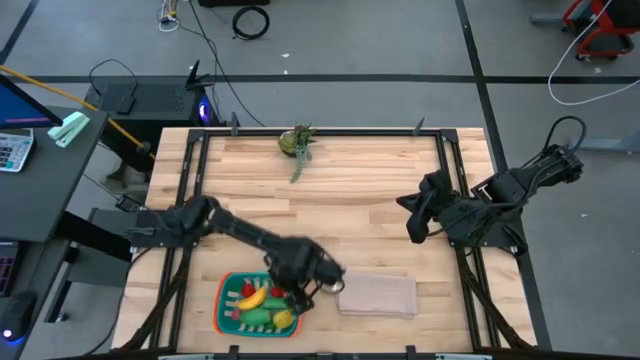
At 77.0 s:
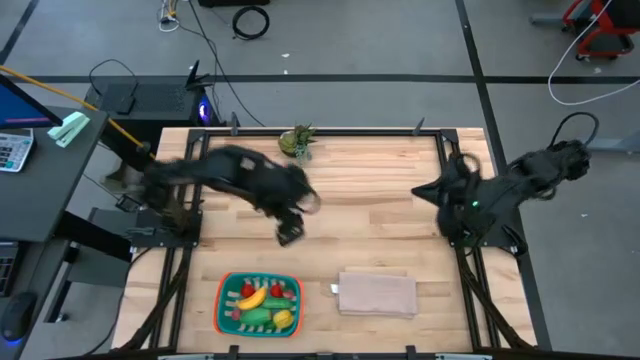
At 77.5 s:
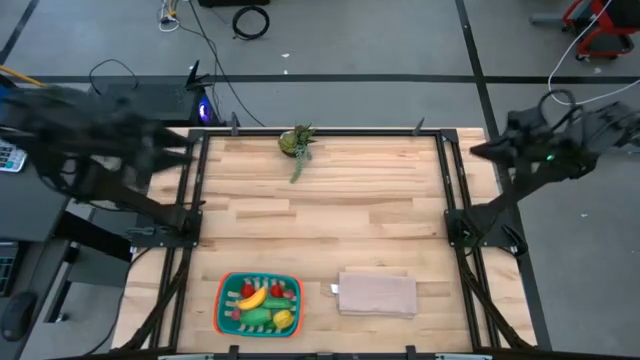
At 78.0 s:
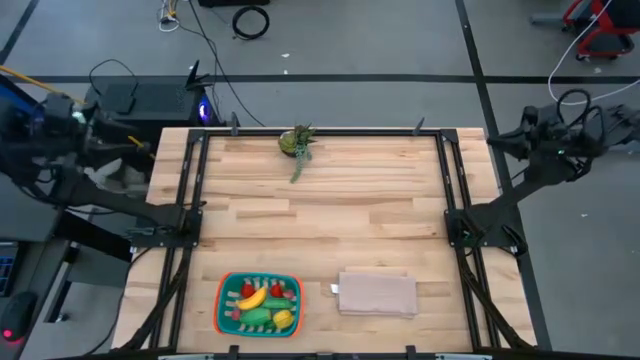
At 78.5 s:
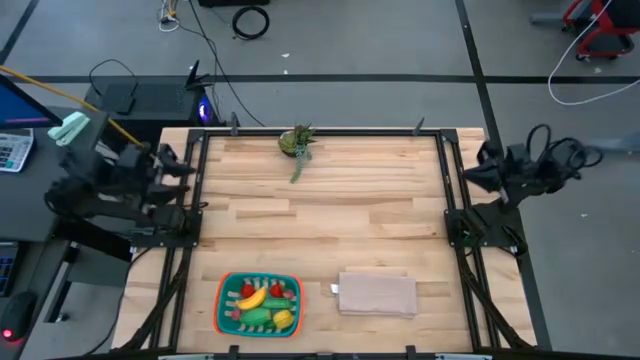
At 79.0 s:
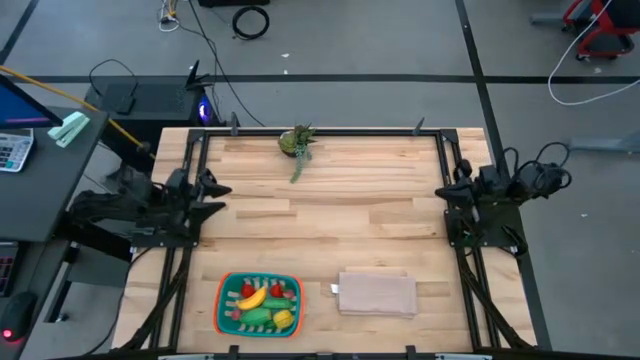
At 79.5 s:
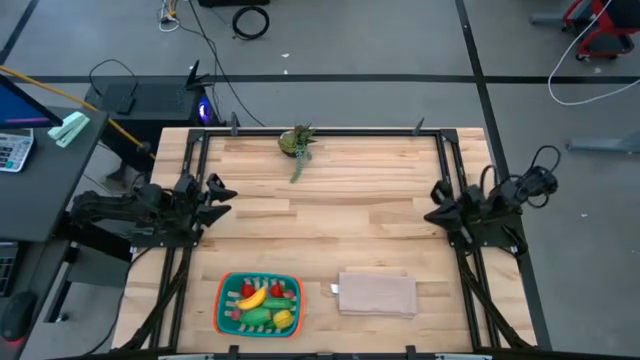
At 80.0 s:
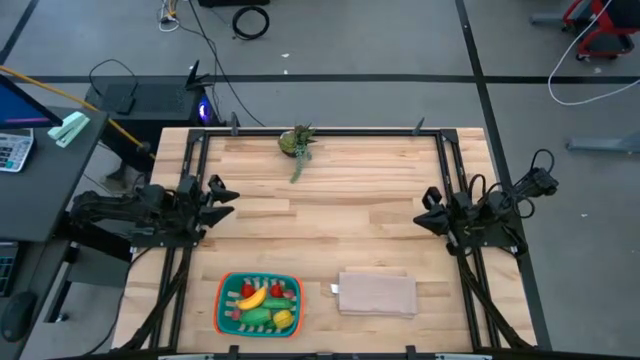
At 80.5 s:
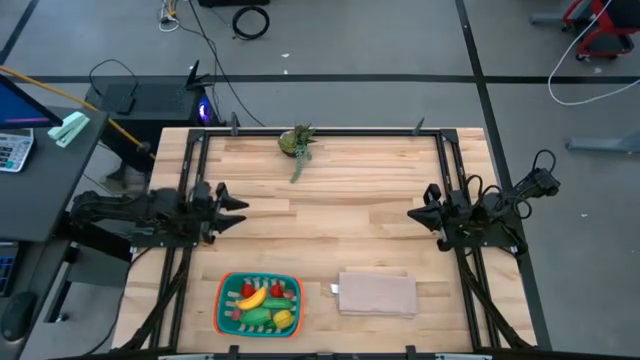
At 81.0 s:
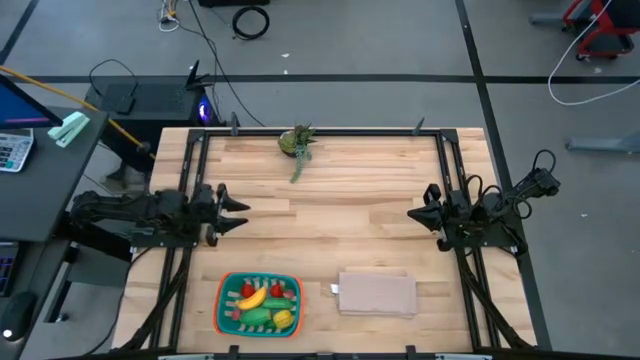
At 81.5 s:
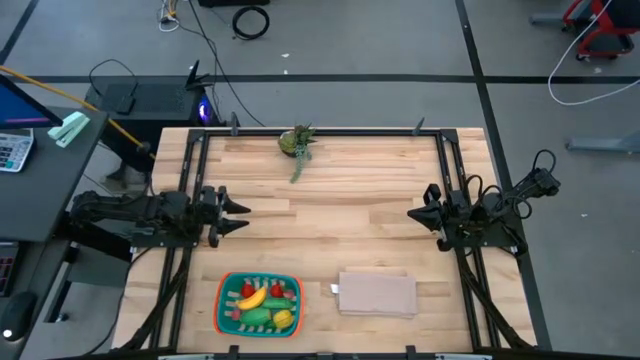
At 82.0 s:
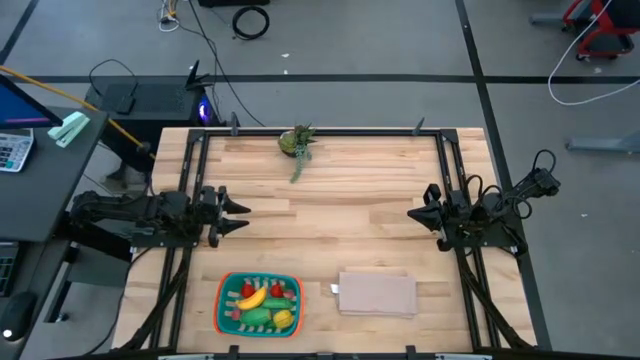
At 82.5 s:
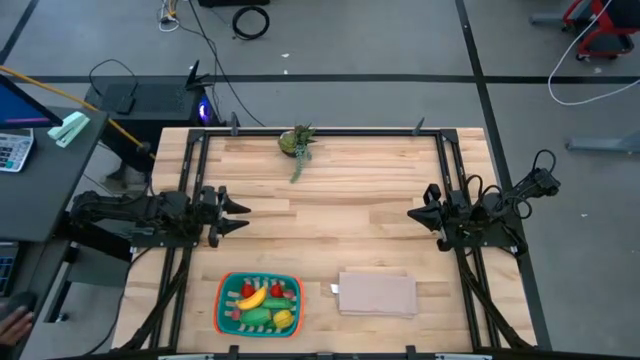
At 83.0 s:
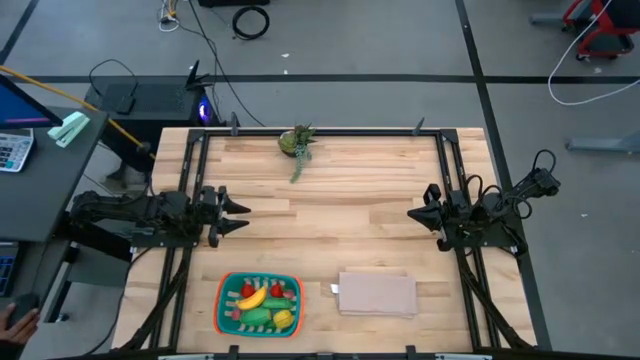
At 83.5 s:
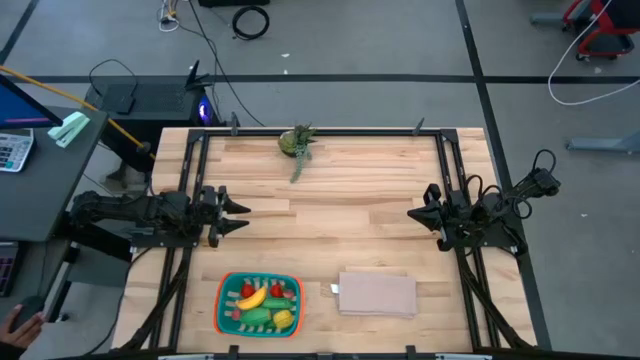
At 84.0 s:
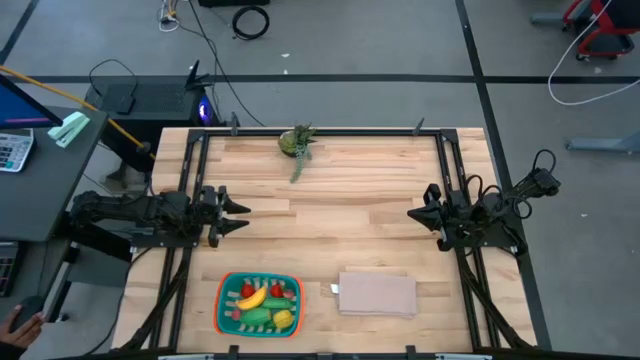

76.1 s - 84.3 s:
Task: Pick and placing Produce into tupperware
Return to Home Position

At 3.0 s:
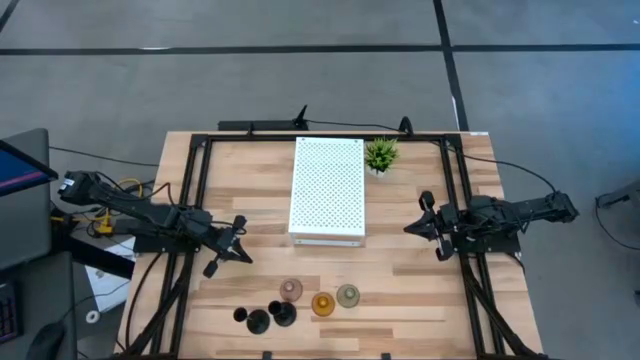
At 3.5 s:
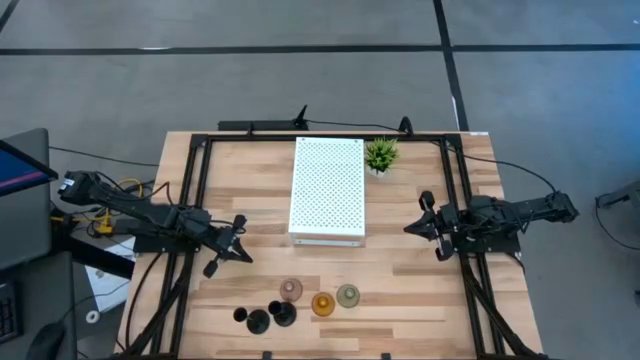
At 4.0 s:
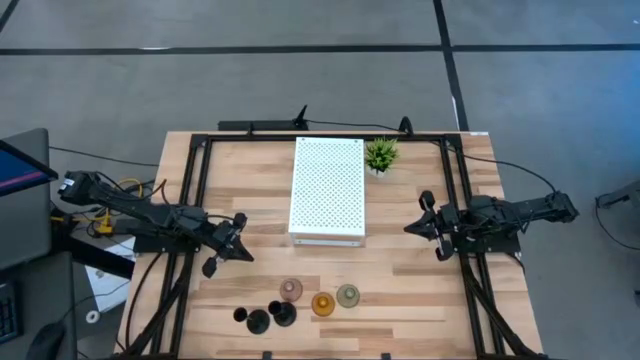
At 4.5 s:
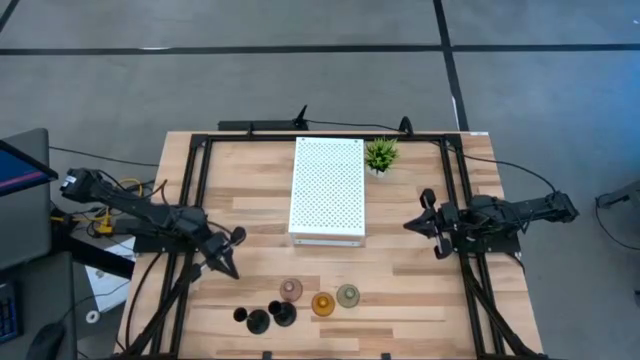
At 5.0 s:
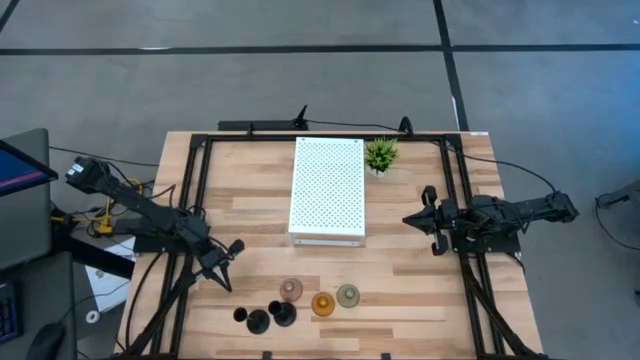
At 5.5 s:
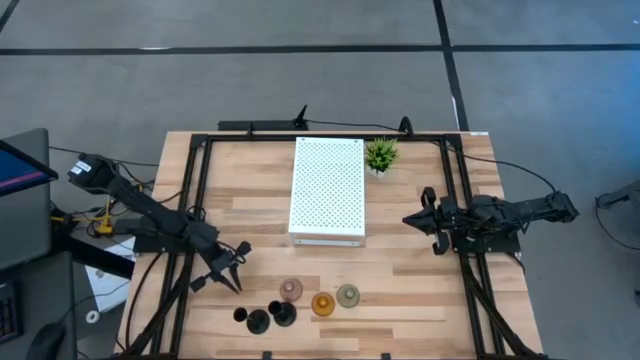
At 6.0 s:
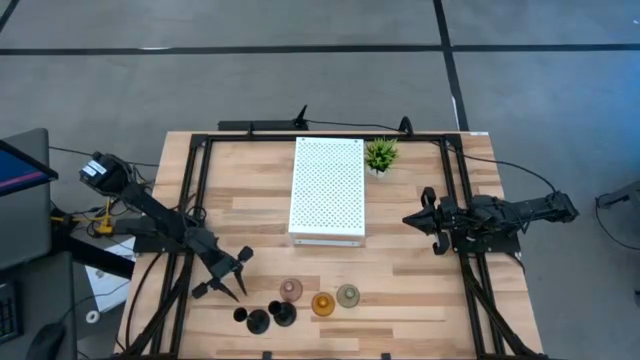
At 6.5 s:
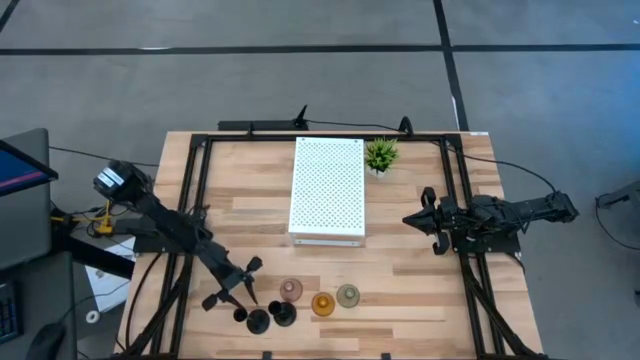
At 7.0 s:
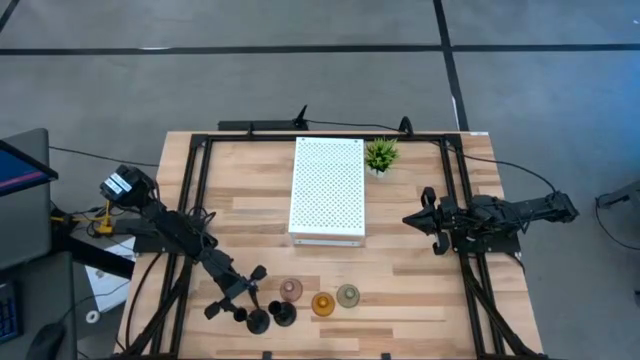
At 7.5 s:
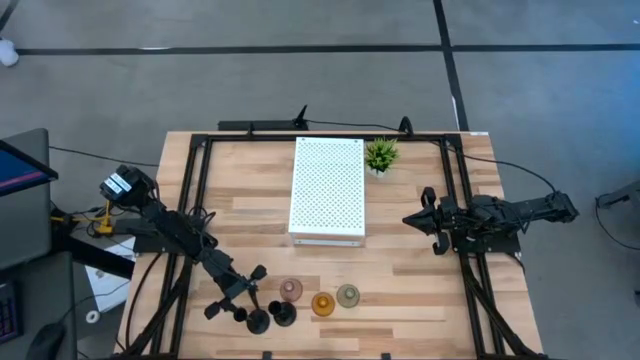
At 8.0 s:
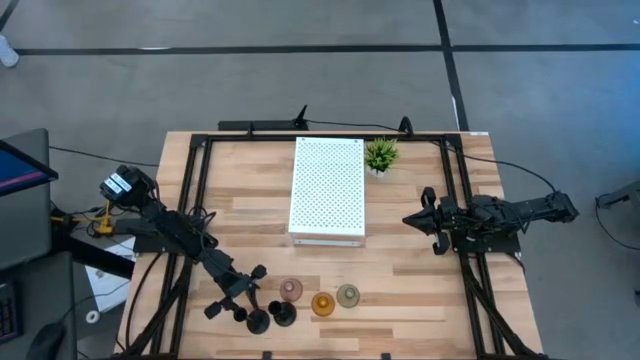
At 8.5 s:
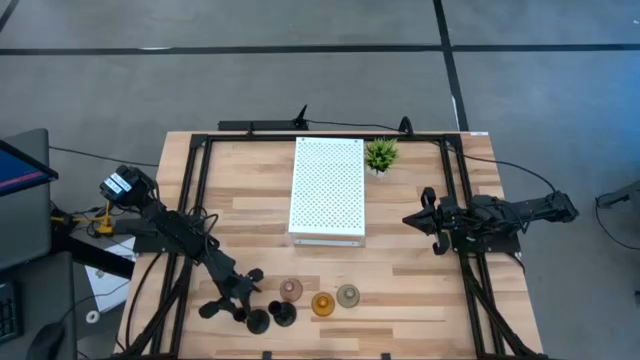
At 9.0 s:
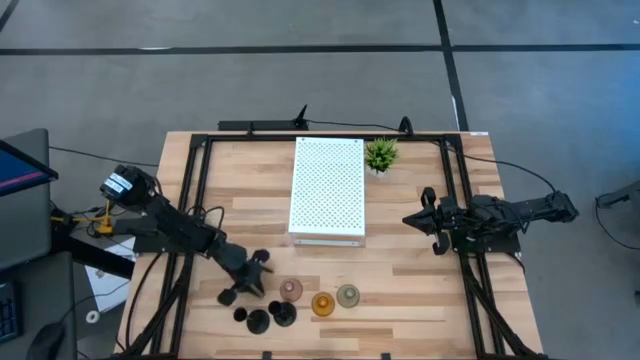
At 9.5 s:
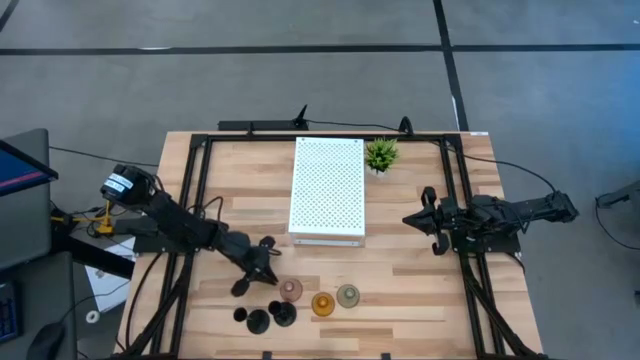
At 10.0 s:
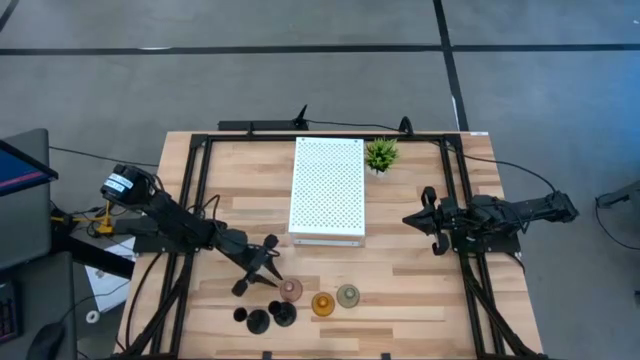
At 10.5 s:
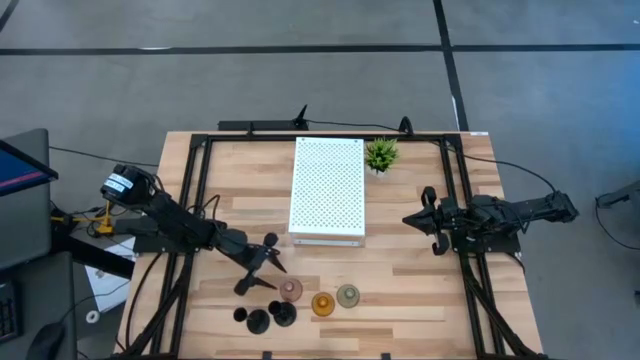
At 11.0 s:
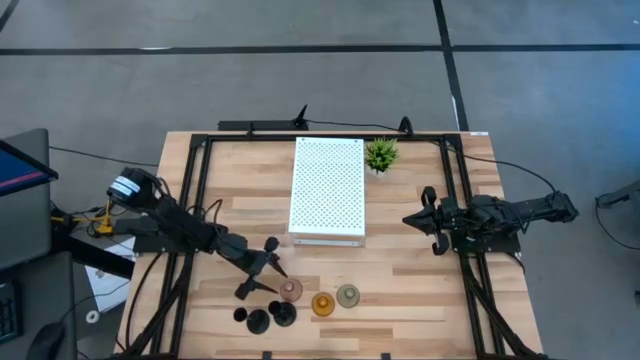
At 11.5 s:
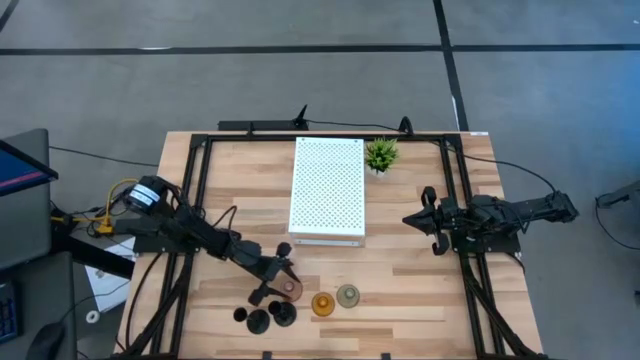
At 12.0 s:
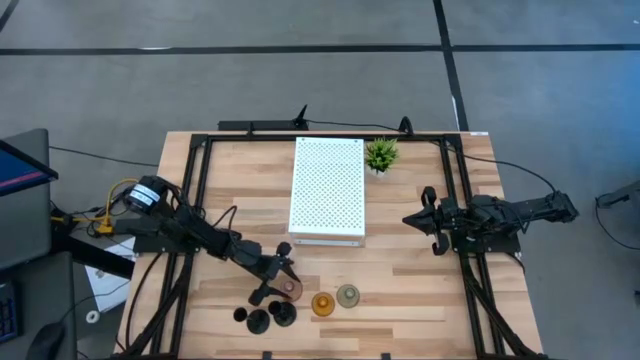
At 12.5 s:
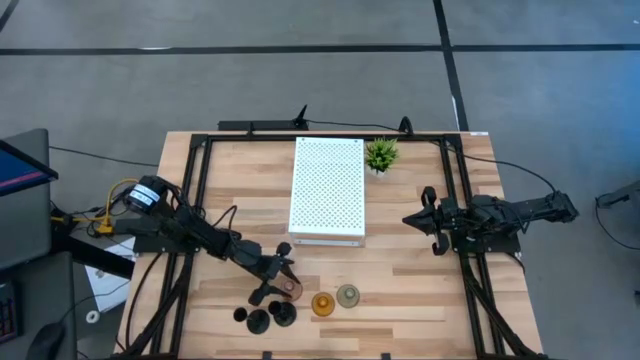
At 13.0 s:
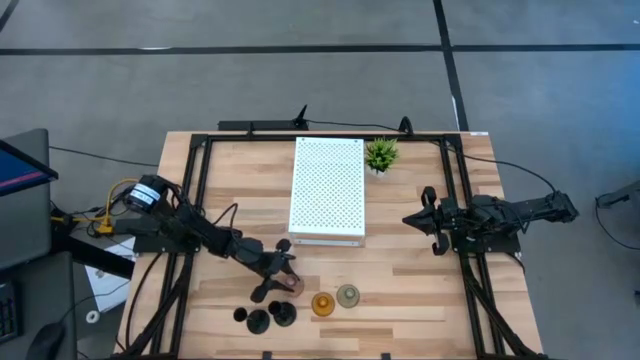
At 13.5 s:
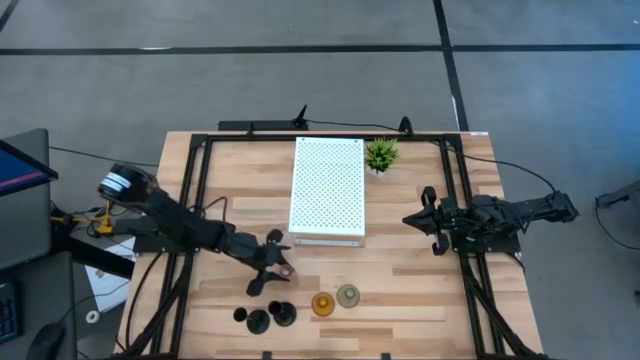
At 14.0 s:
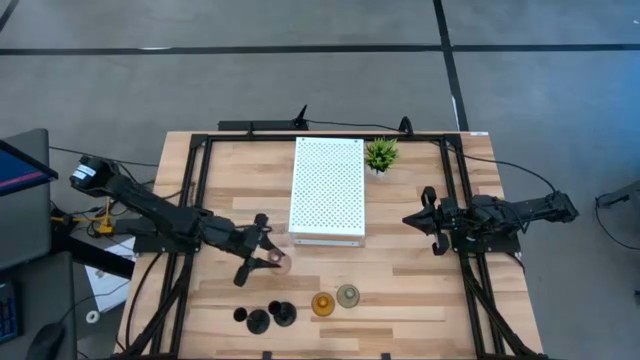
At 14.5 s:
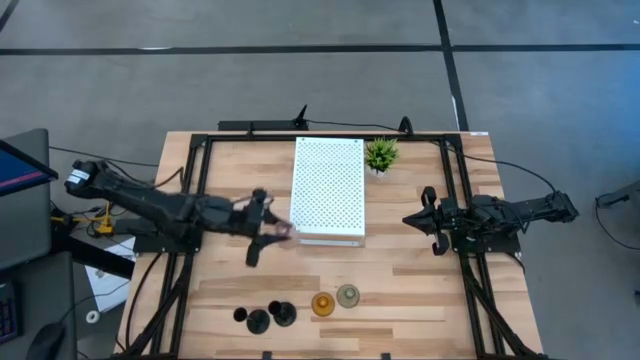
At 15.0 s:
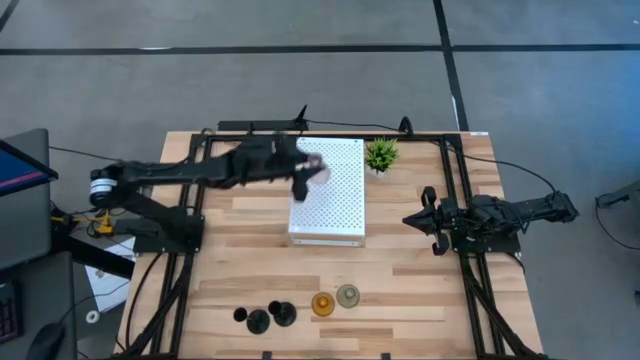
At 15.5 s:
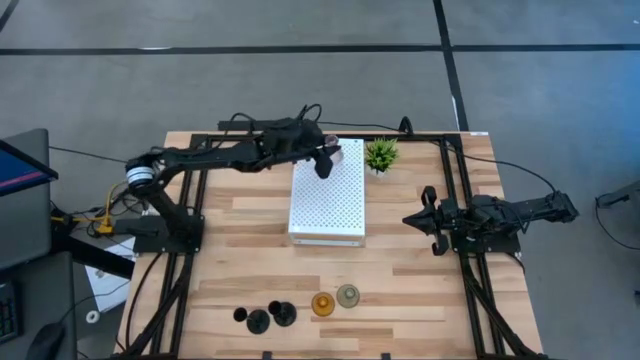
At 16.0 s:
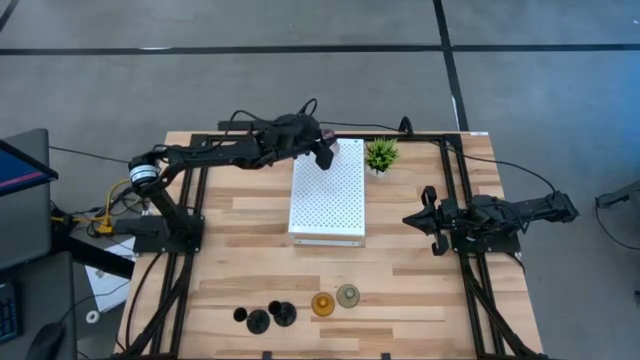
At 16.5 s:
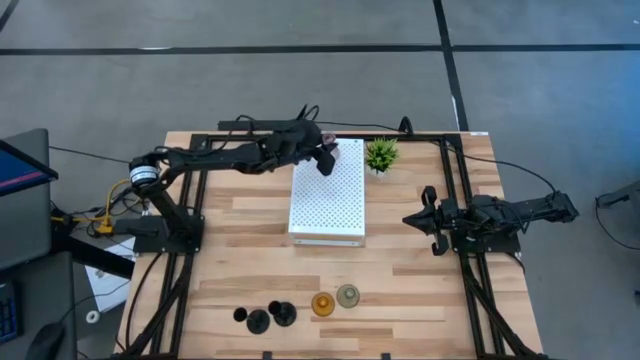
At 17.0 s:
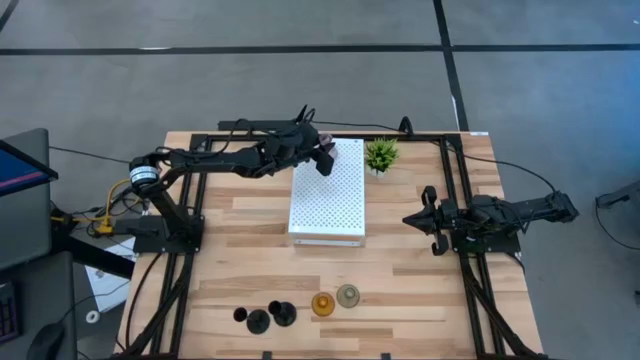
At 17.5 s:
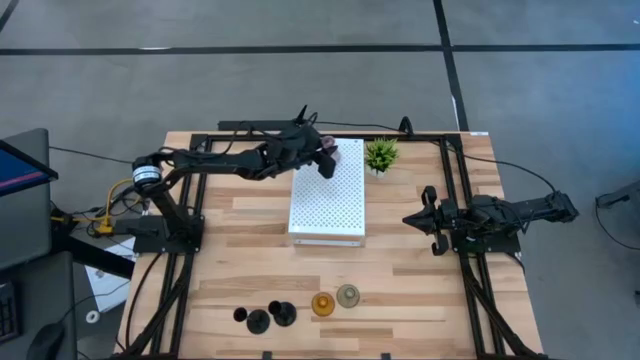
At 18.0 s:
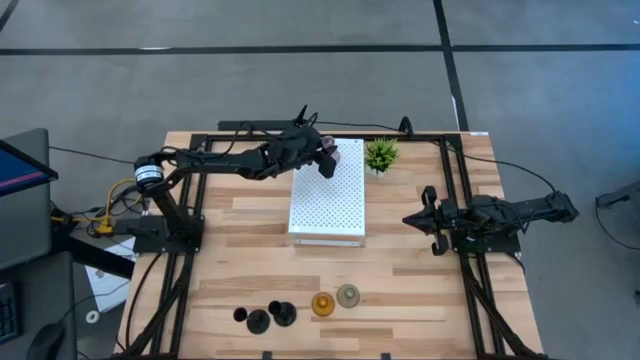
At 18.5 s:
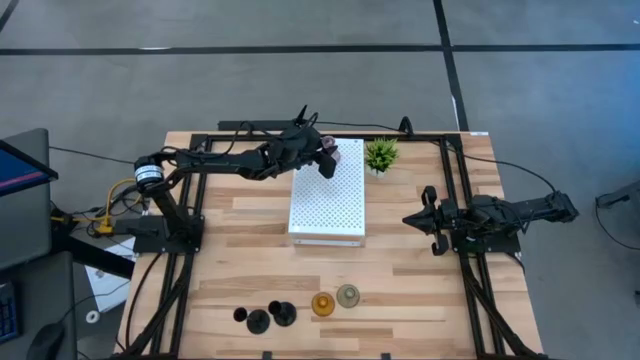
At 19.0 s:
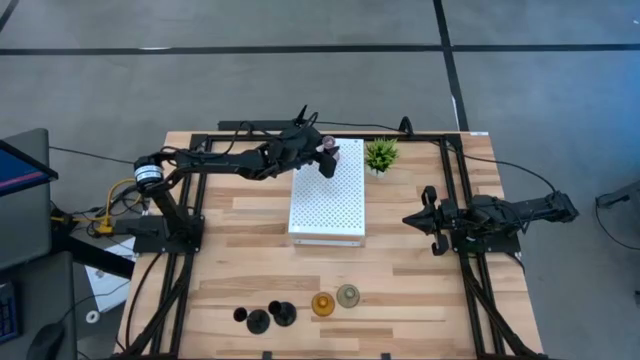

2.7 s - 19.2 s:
Task: Pick & Place candle stick holders
Put the purple glass candle holder on the shelf
